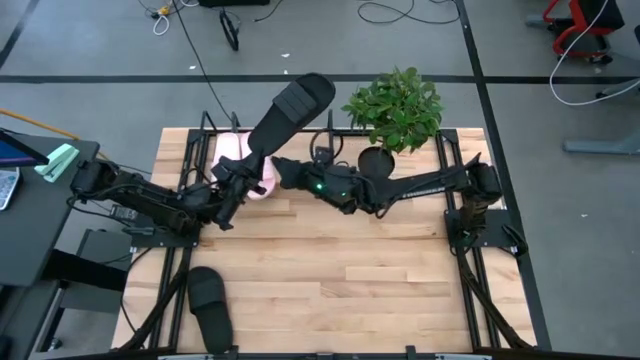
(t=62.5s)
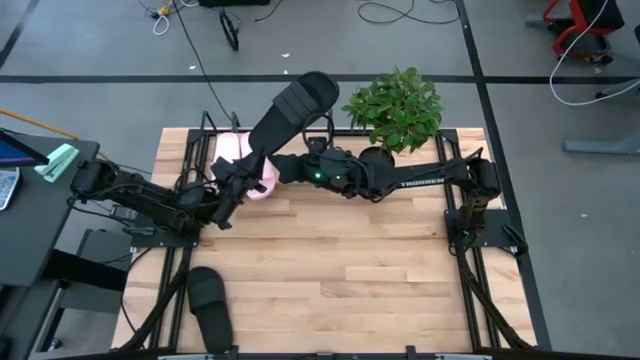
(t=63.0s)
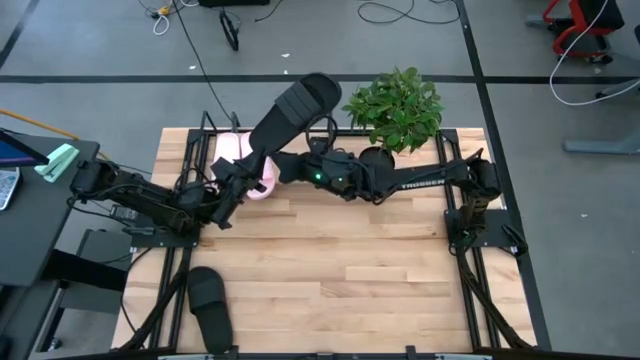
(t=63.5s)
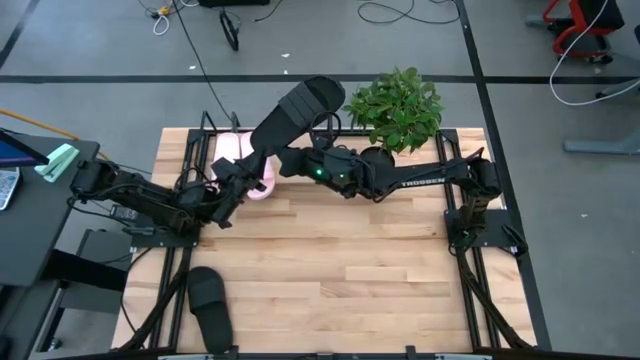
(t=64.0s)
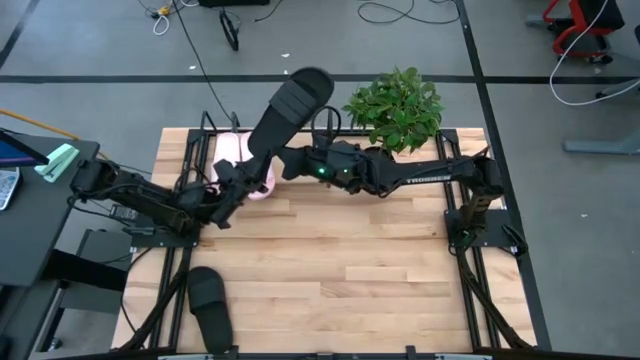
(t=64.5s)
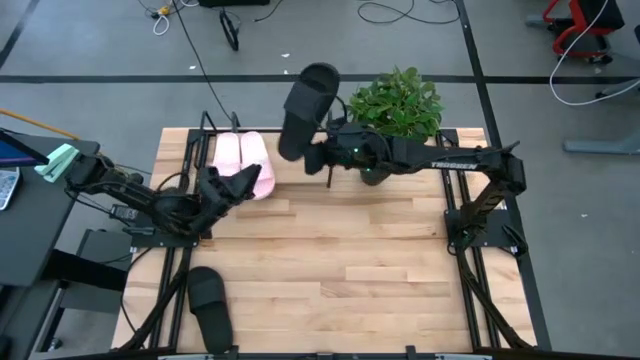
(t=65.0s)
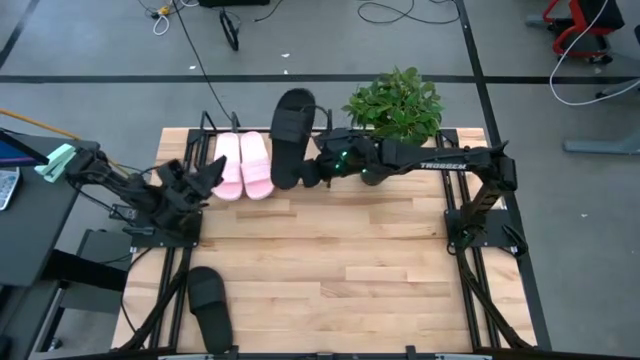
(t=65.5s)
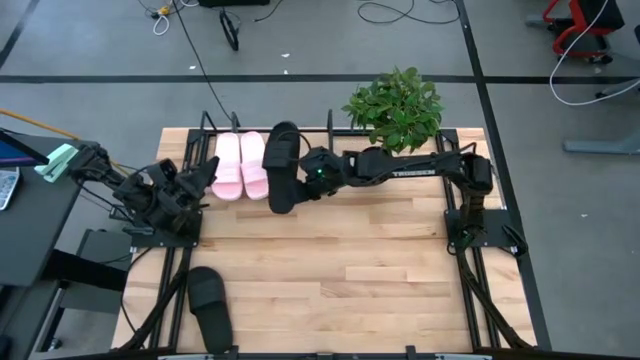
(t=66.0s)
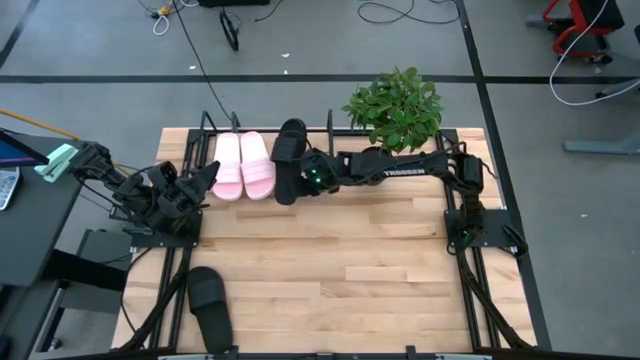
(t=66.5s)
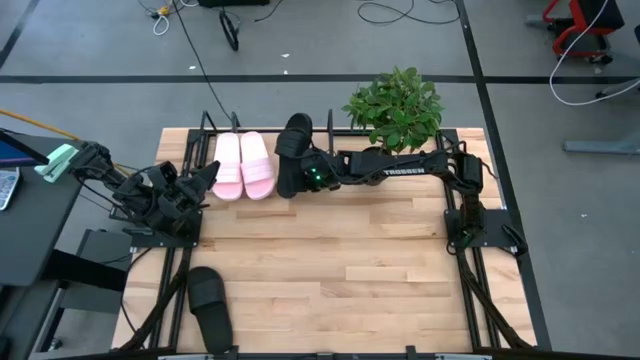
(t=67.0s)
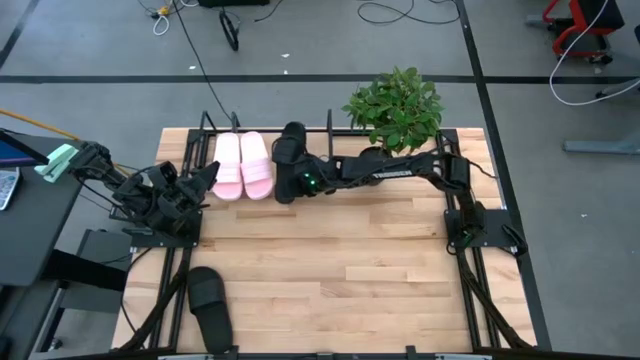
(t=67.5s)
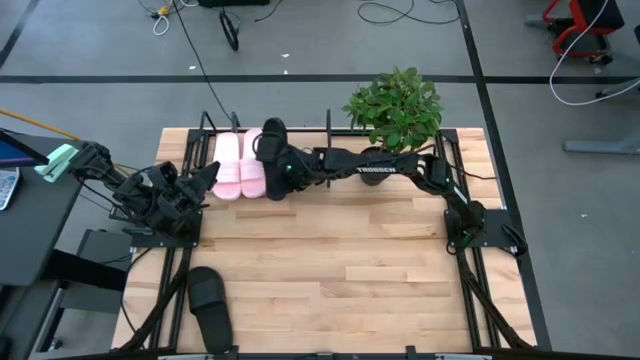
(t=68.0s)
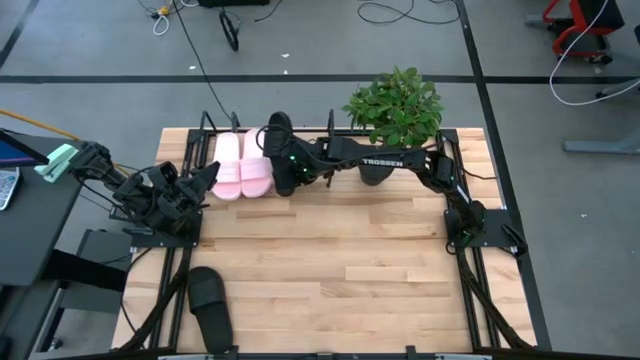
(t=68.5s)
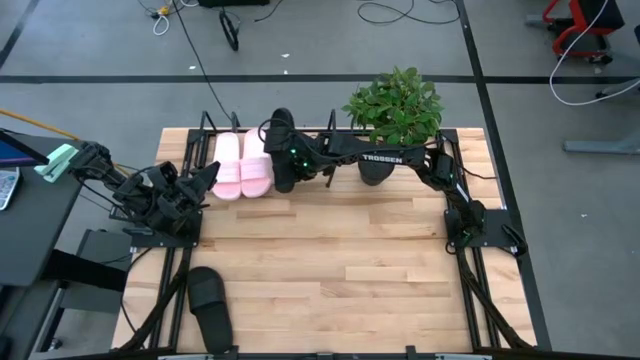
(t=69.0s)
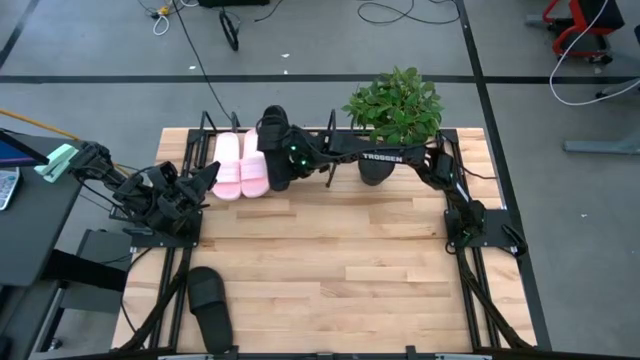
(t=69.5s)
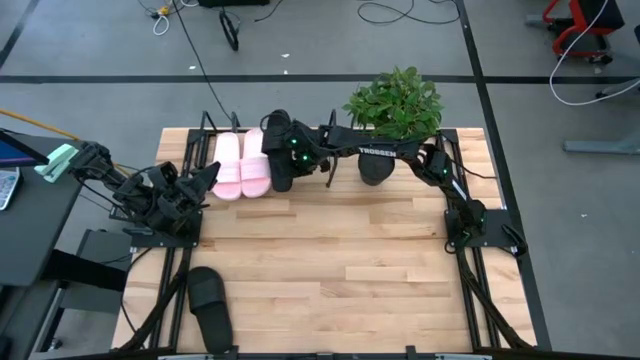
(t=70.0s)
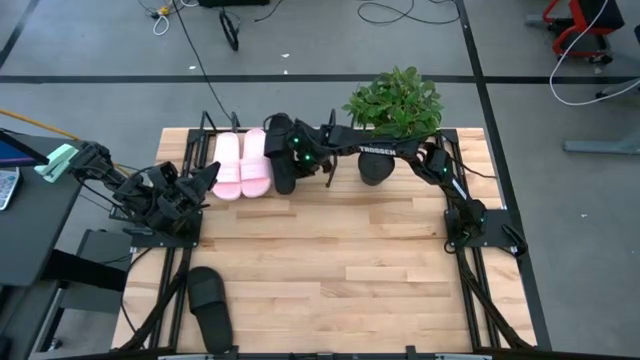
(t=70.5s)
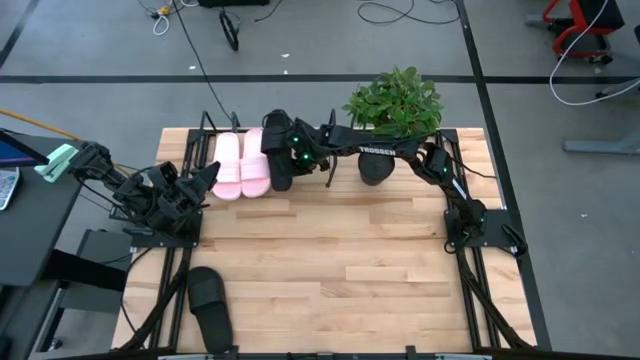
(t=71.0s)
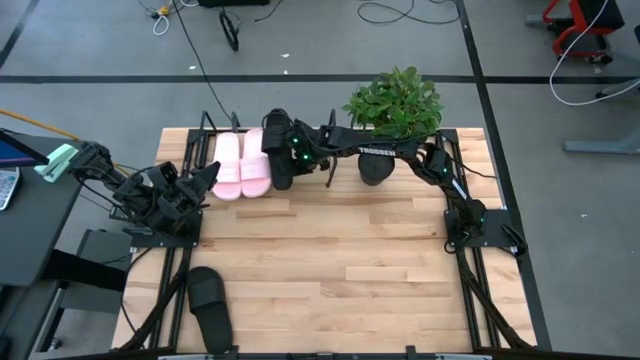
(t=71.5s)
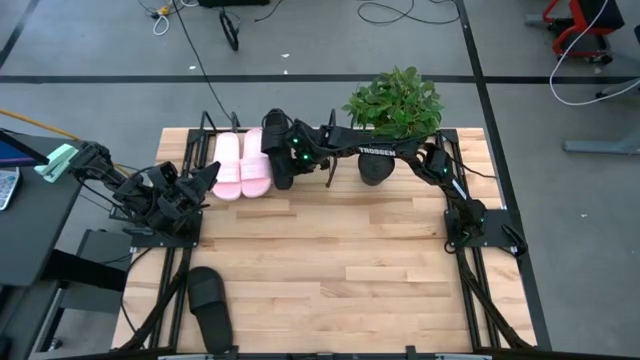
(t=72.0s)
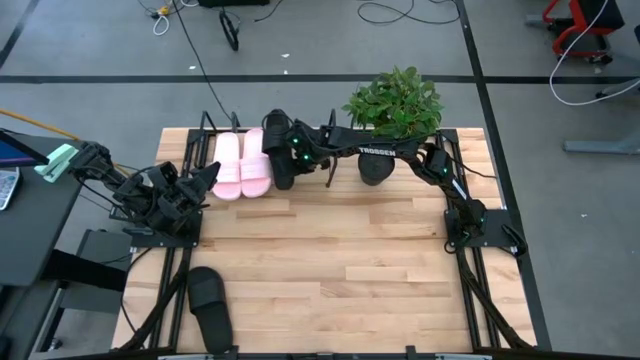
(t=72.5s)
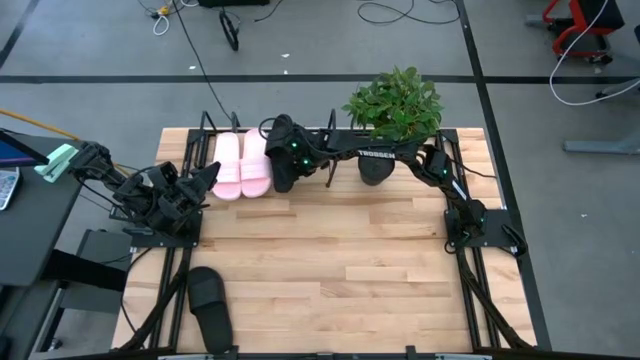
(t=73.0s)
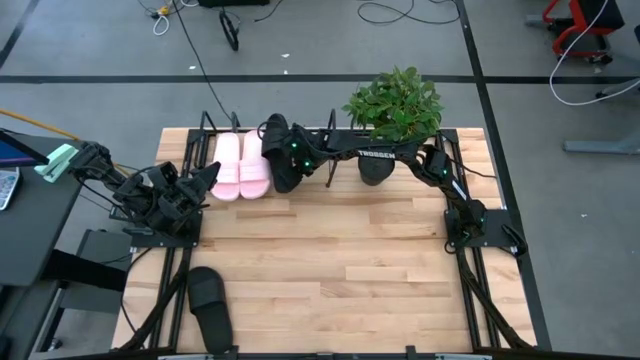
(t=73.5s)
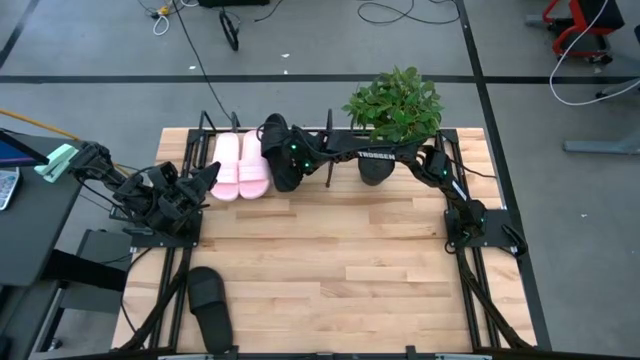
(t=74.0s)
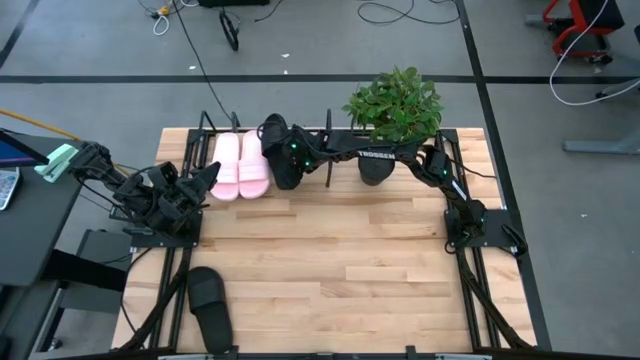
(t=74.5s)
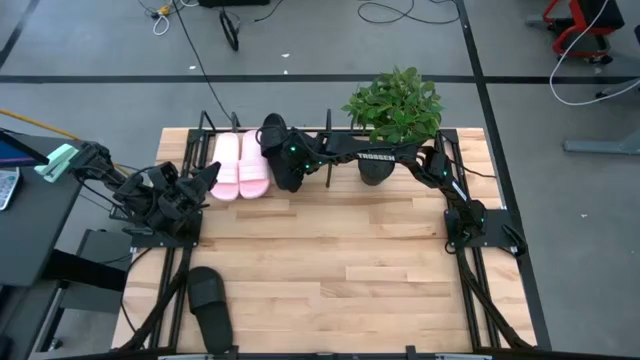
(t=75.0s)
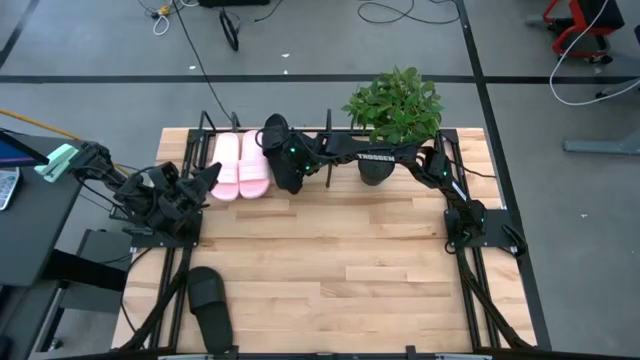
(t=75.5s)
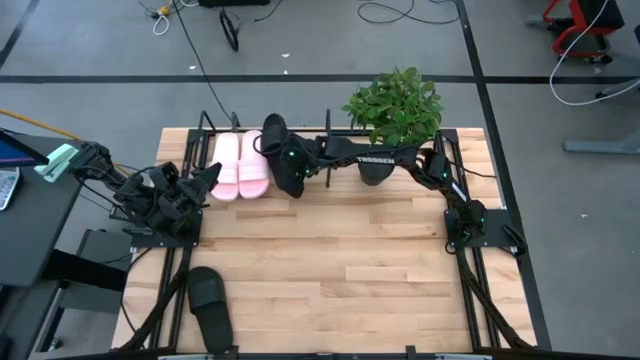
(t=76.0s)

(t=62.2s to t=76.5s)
Task: Pick and place slides into the shelf
Put the top black slide on the shelf

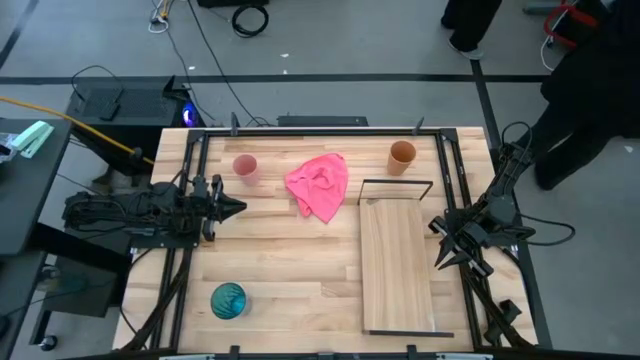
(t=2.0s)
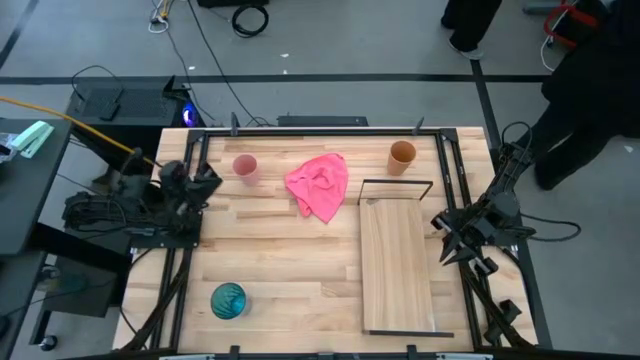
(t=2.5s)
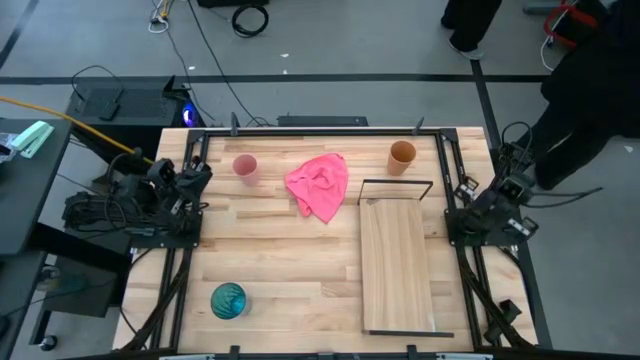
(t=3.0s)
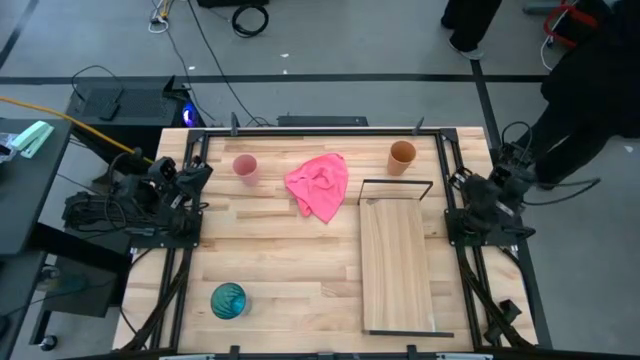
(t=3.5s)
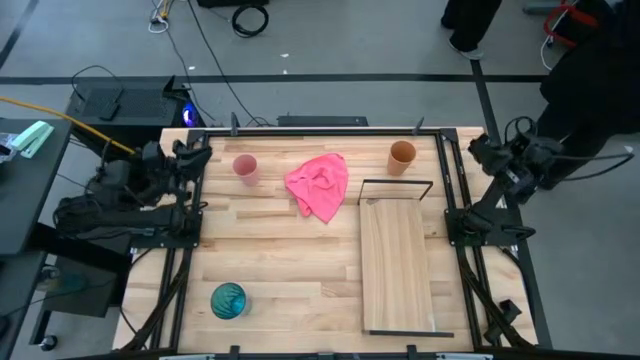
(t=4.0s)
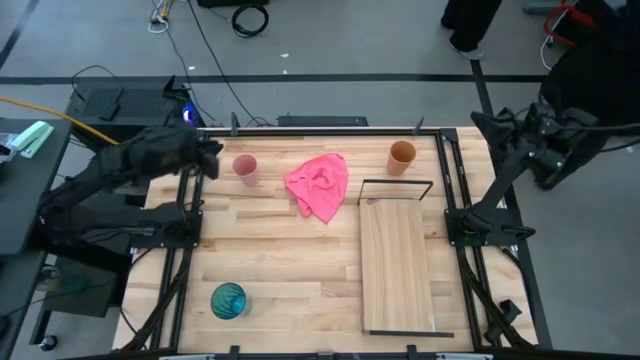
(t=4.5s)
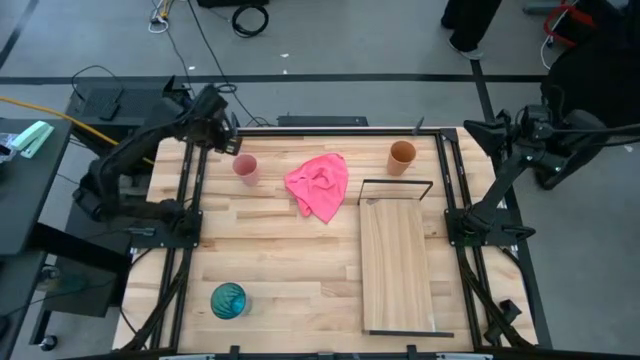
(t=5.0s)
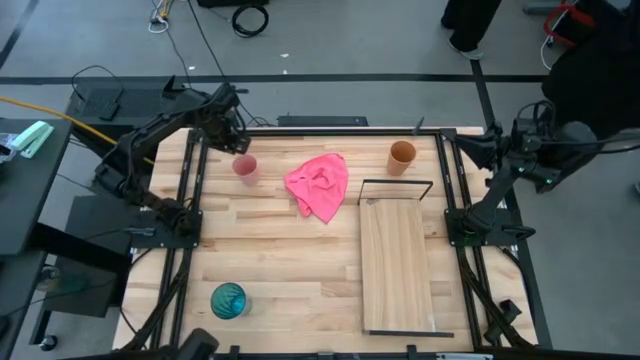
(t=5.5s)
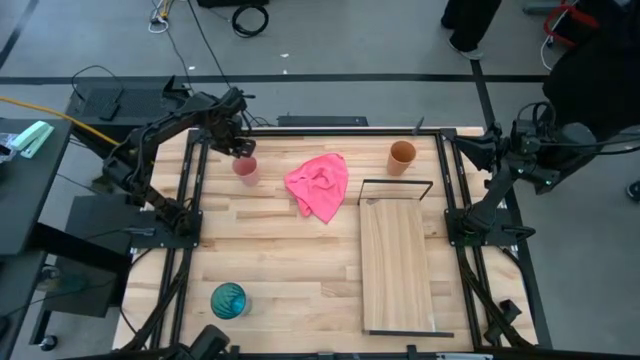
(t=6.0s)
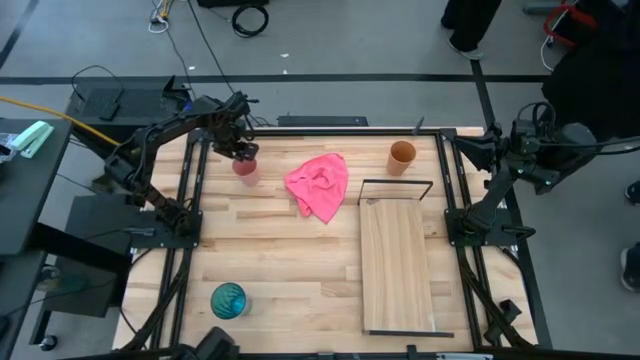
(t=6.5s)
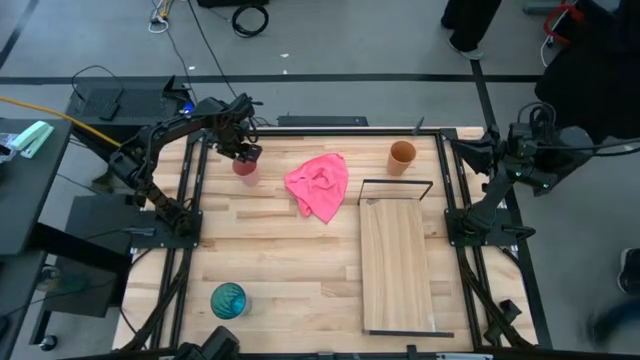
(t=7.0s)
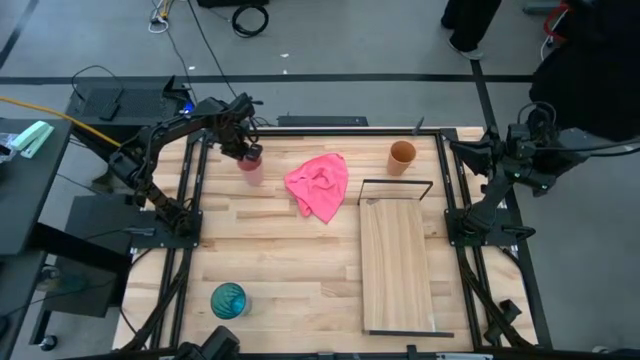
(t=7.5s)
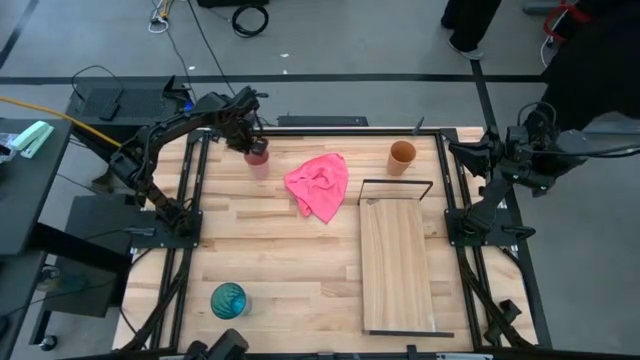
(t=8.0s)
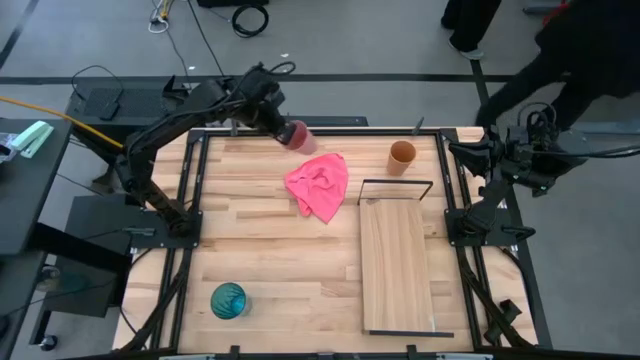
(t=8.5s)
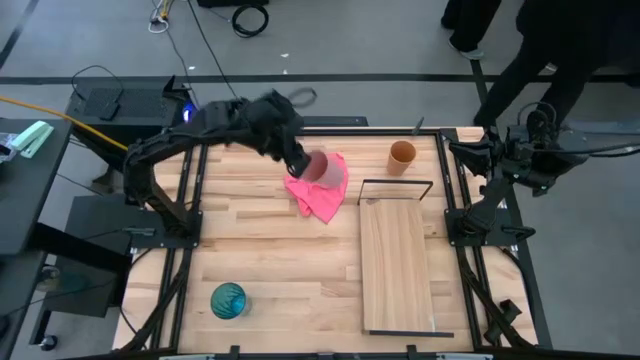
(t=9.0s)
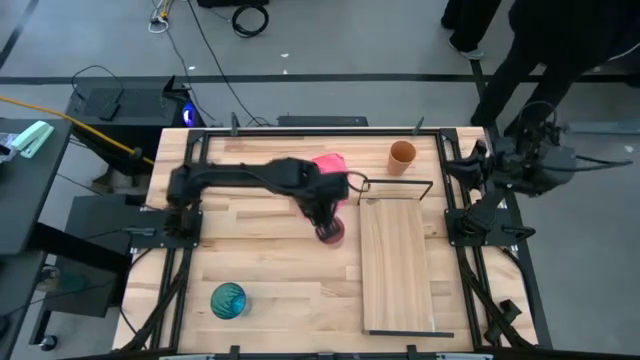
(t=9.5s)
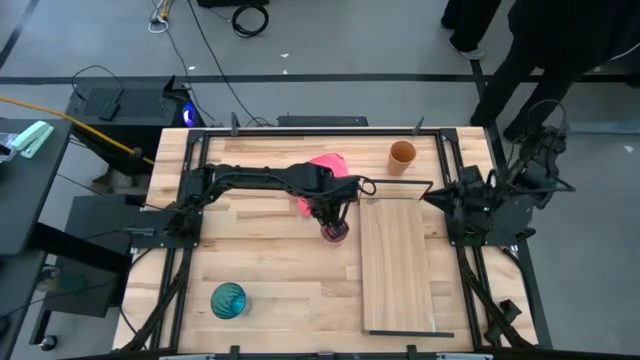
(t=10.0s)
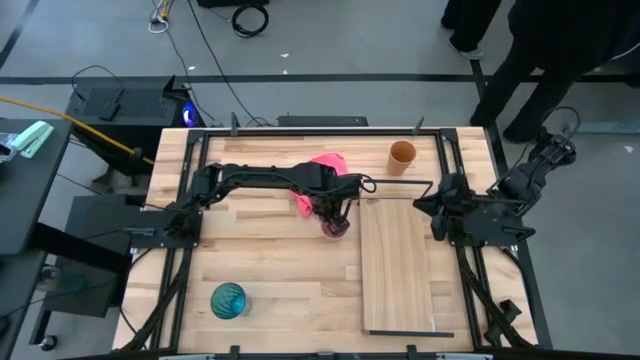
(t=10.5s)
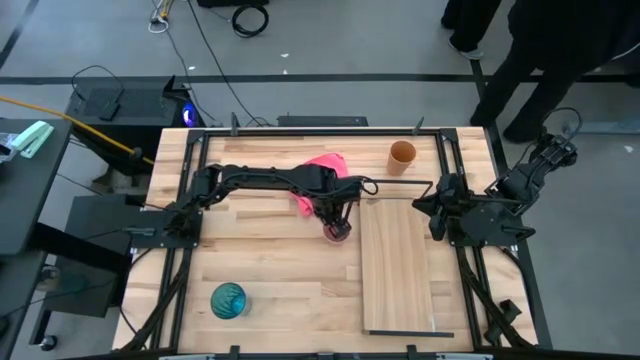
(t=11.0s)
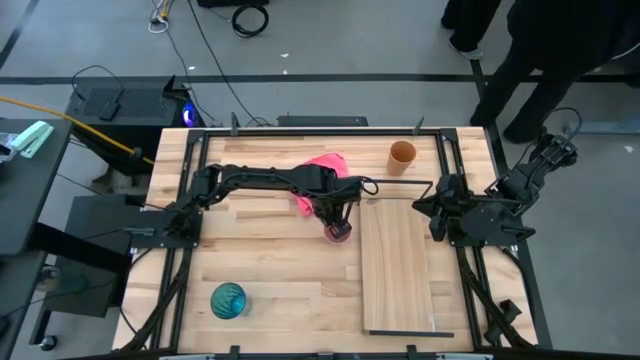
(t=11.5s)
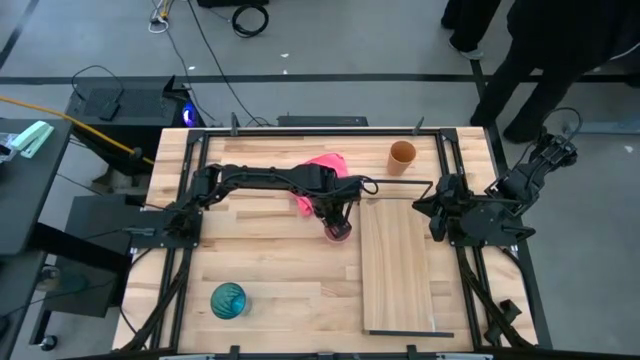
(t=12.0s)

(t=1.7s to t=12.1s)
Task: Stack small to large cups/mugs on shelf
Move the pink plastic glass from the top left to the center of the table
